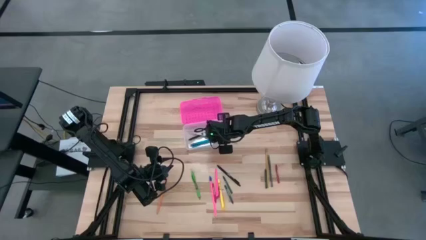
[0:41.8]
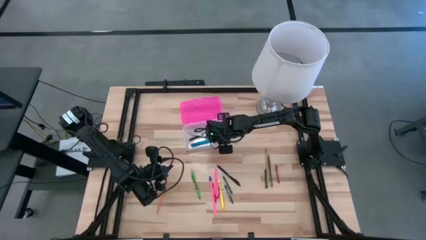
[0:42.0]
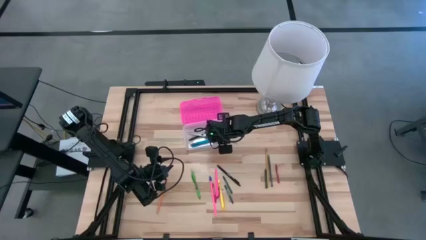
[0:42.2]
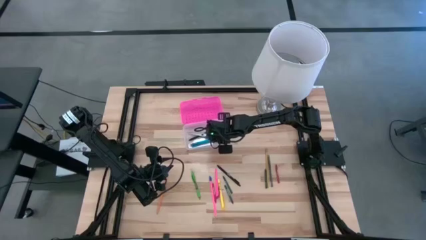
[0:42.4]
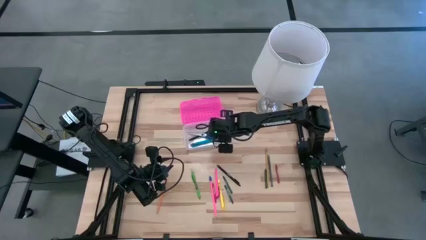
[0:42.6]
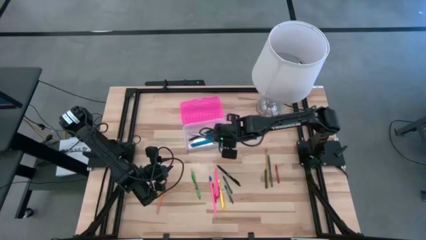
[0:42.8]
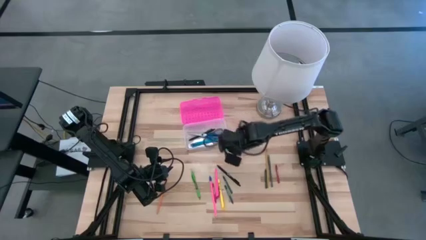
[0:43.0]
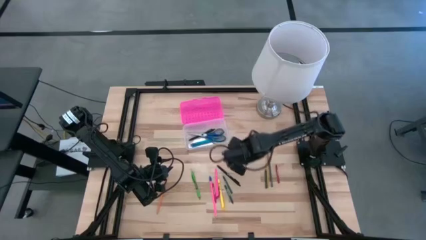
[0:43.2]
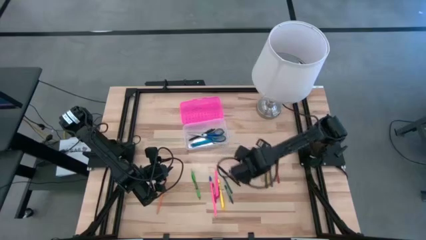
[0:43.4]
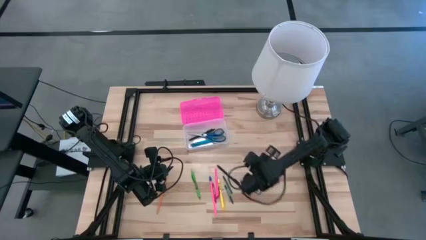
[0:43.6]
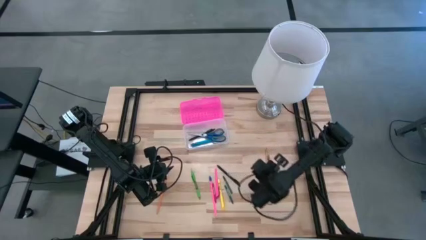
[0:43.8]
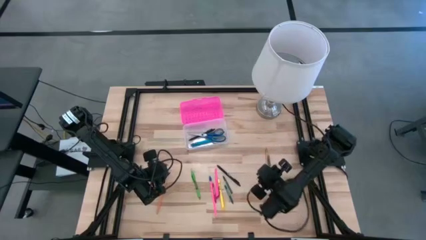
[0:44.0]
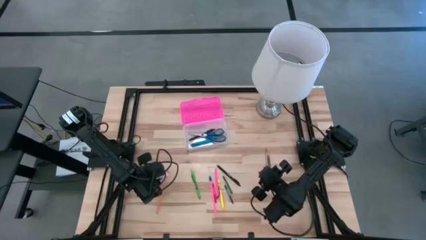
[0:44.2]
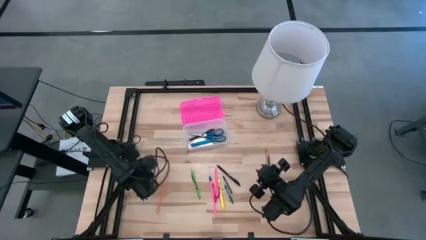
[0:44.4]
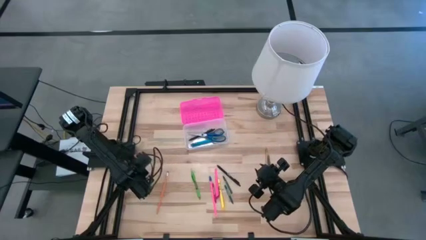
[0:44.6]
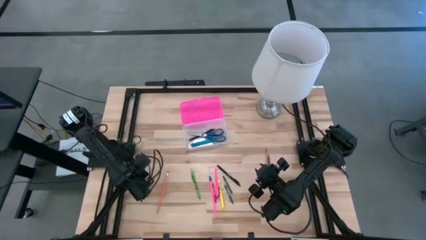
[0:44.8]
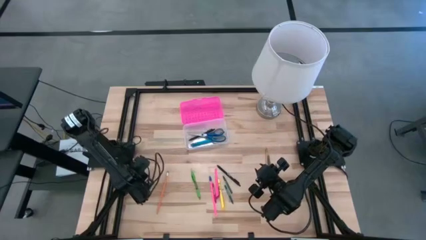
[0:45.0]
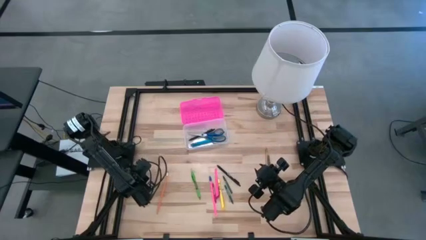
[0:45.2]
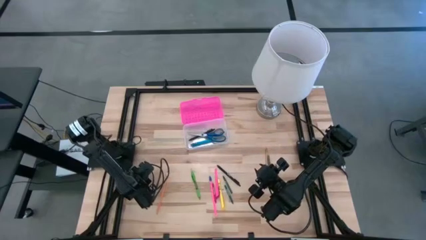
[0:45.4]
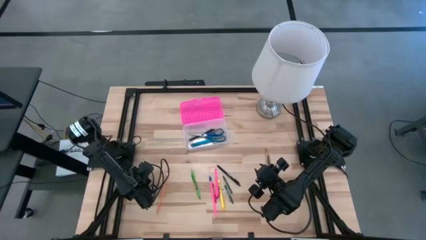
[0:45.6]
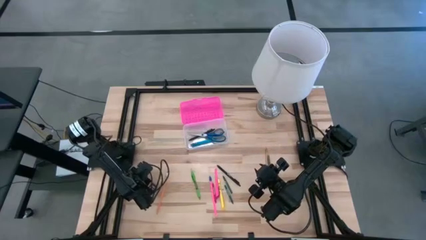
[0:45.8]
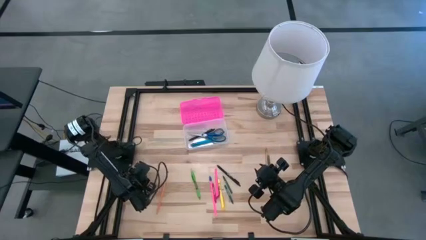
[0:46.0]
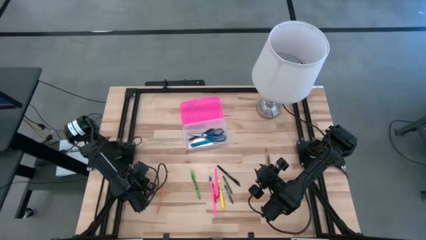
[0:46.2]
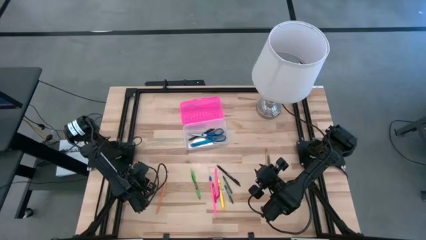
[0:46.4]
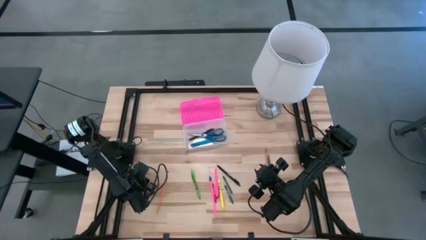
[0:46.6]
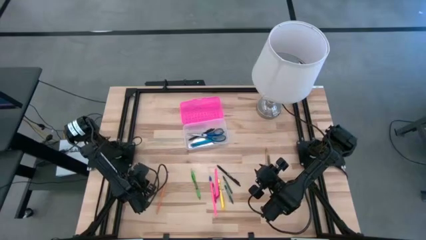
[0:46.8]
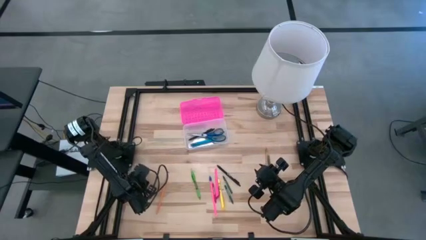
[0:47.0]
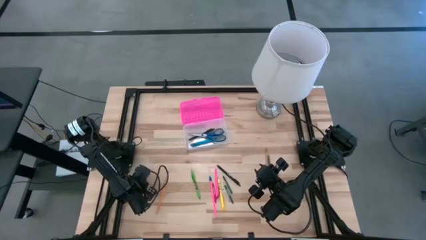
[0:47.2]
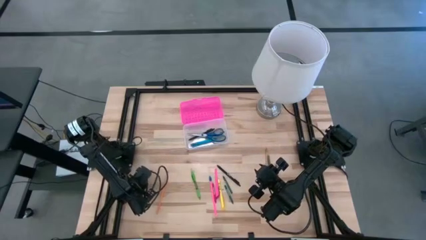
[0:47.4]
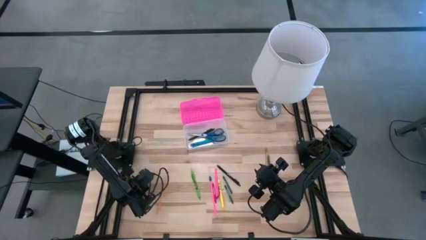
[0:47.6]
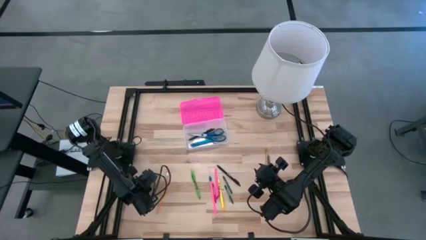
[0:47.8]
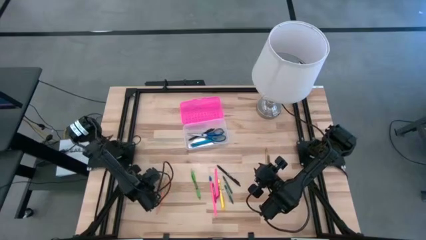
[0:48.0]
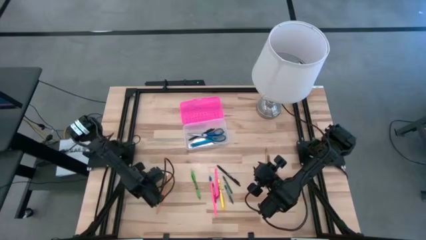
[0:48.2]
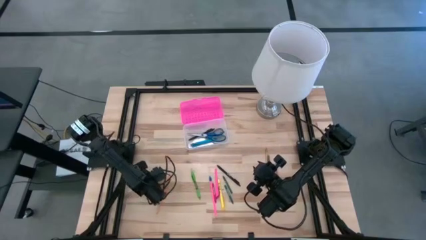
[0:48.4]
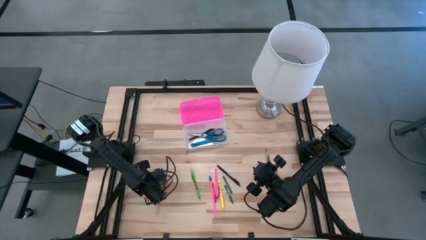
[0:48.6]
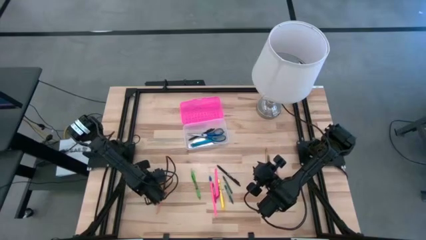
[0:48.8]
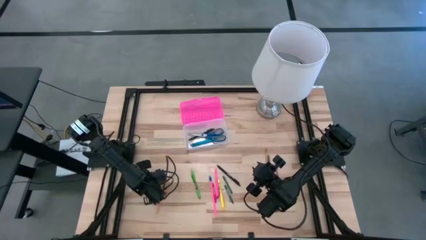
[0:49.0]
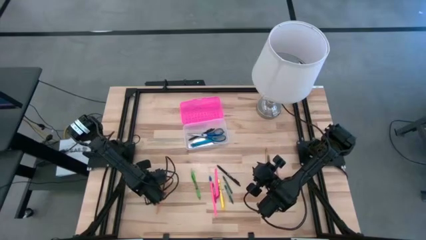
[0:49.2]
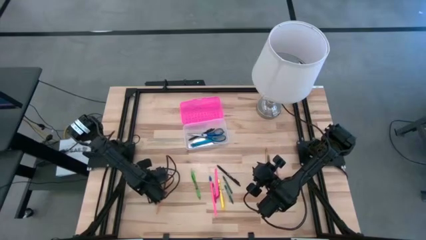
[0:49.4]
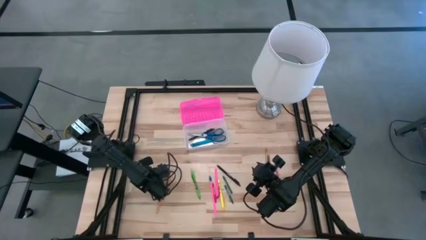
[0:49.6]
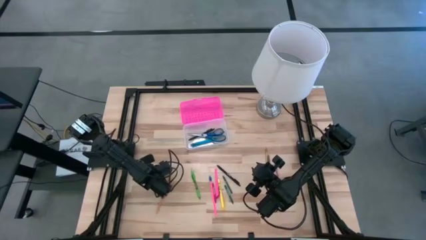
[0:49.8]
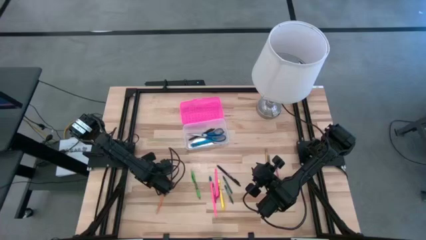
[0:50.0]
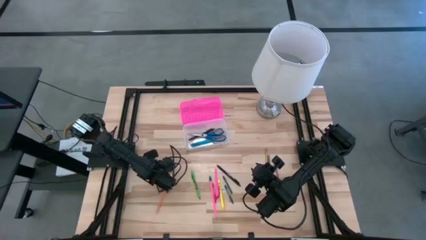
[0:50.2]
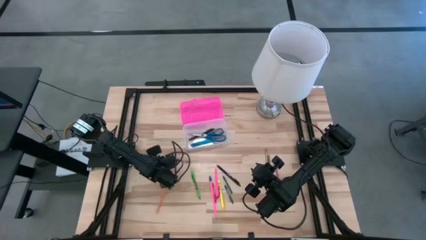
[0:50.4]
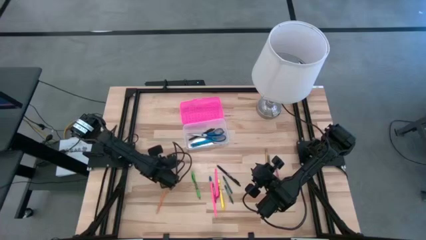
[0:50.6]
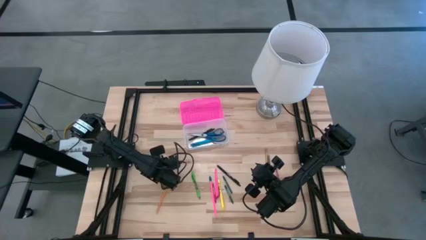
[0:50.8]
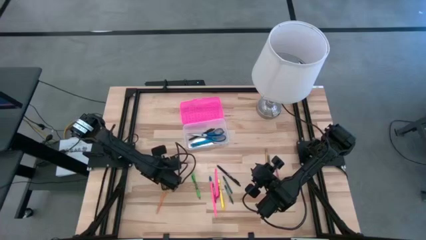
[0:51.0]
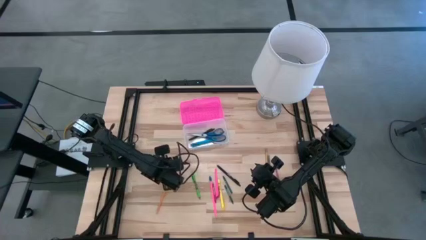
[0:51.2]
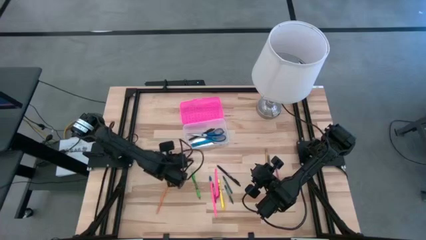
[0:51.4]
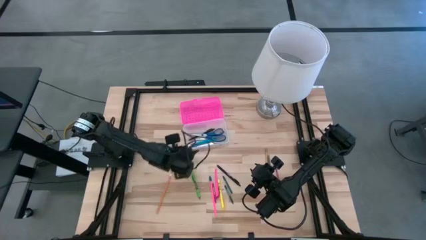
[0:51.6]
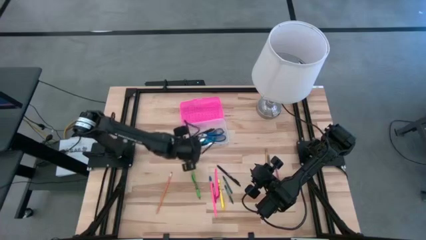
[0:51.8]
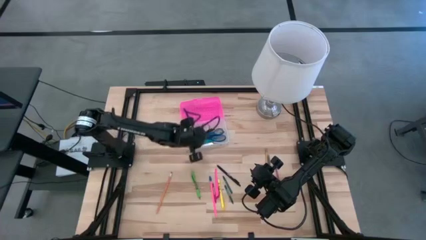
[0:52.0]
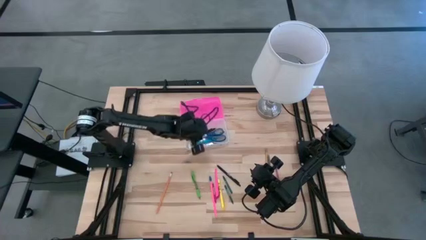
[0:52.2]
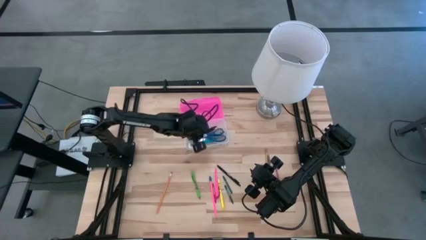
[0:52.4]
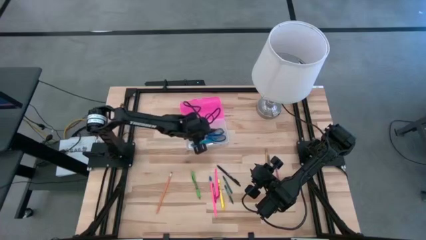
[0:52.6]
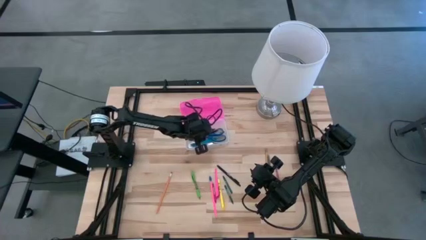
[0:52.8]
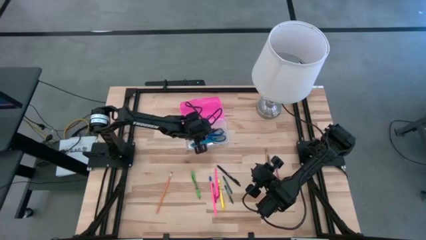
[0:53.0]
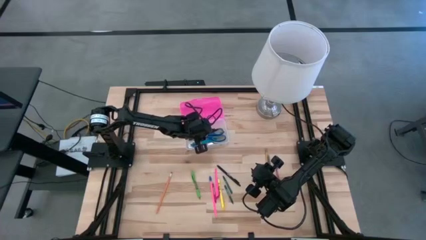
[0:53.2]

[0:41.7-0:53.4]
Task: Pick & place school supplies into a supply box
Put the black pen into the pink supply box

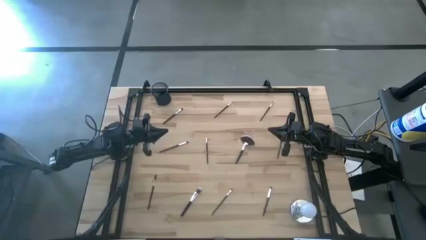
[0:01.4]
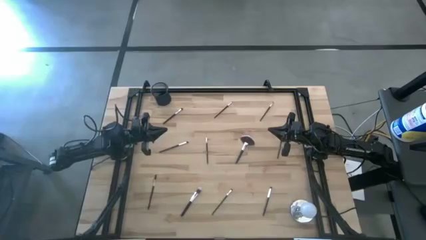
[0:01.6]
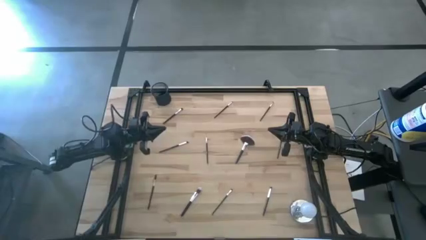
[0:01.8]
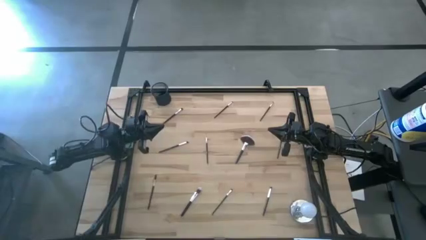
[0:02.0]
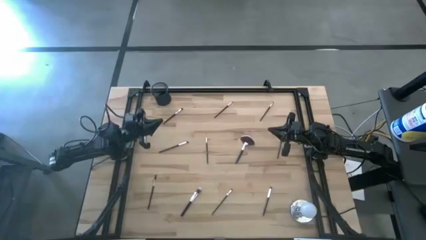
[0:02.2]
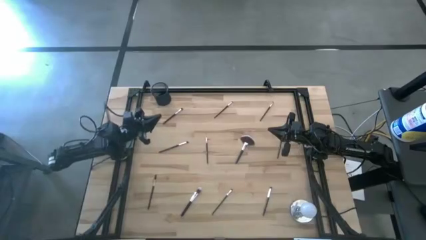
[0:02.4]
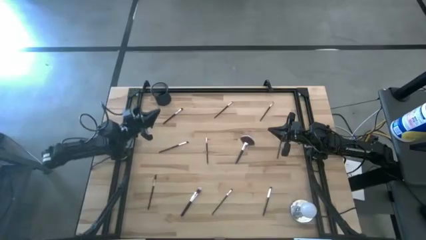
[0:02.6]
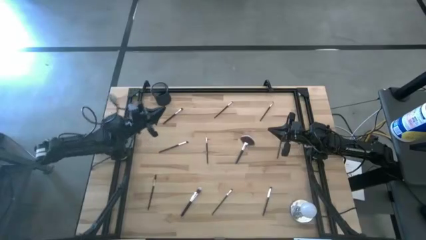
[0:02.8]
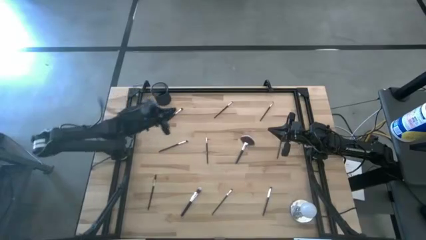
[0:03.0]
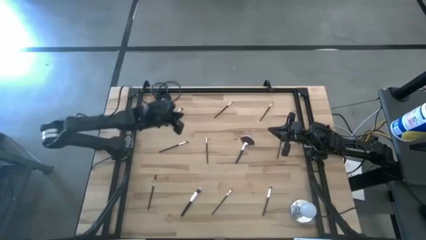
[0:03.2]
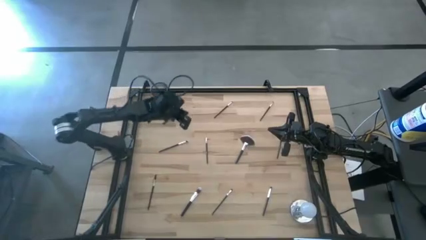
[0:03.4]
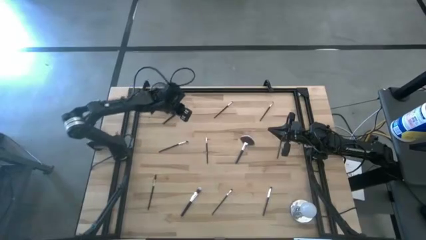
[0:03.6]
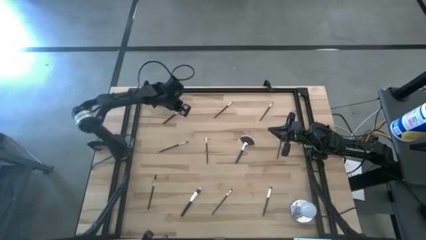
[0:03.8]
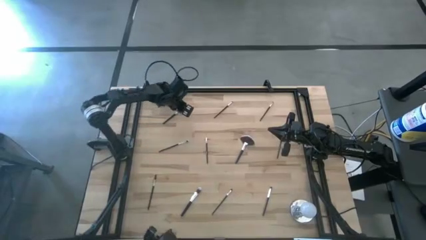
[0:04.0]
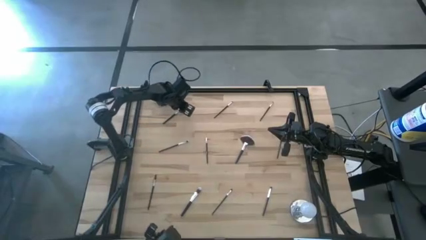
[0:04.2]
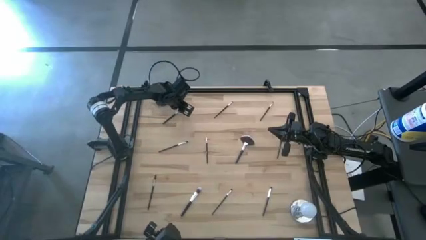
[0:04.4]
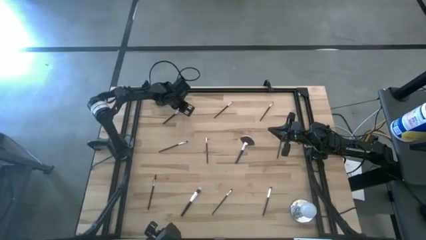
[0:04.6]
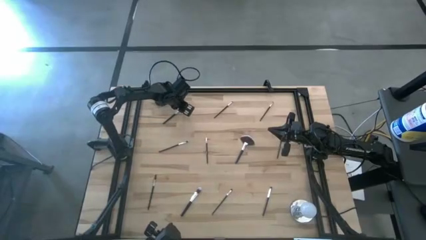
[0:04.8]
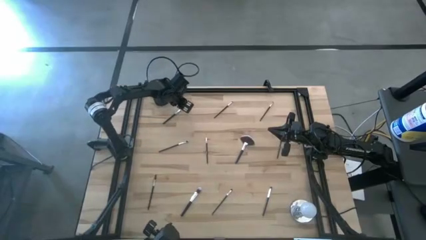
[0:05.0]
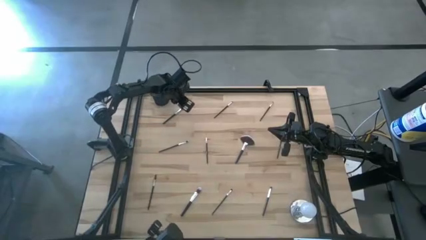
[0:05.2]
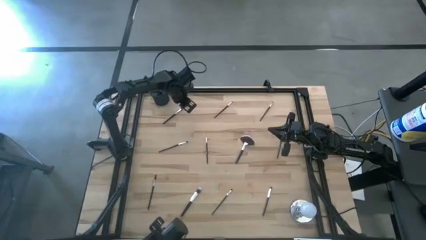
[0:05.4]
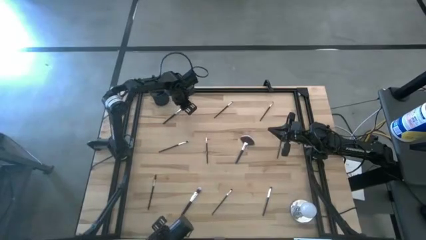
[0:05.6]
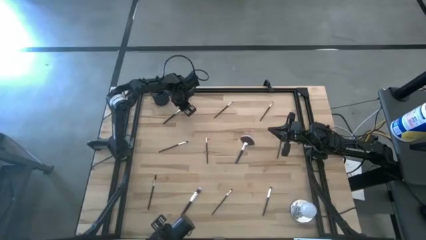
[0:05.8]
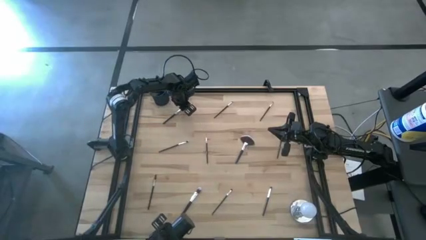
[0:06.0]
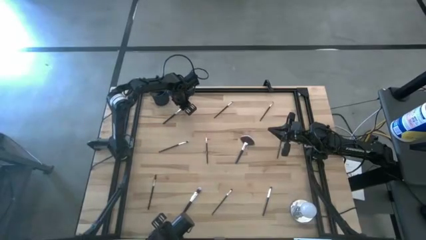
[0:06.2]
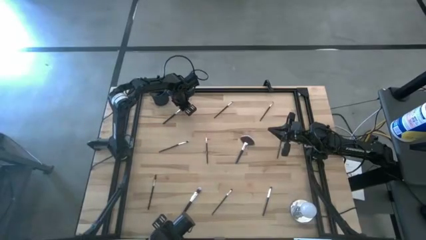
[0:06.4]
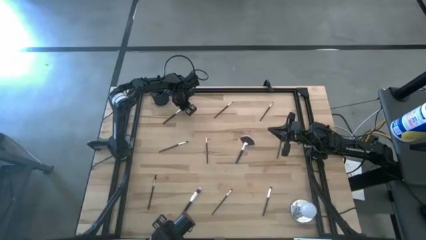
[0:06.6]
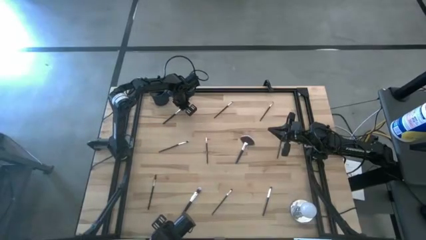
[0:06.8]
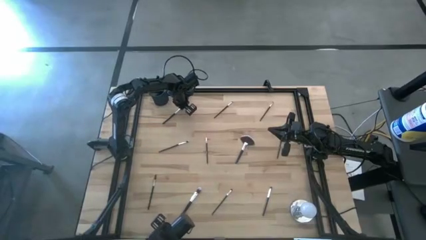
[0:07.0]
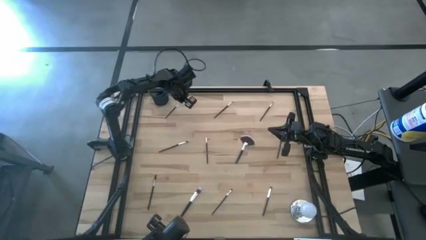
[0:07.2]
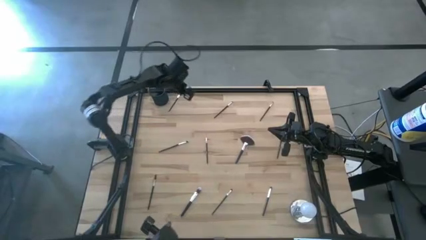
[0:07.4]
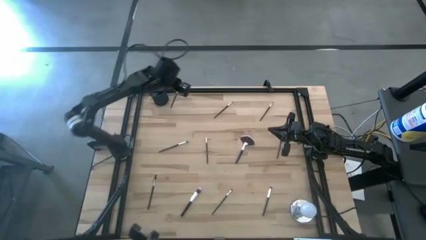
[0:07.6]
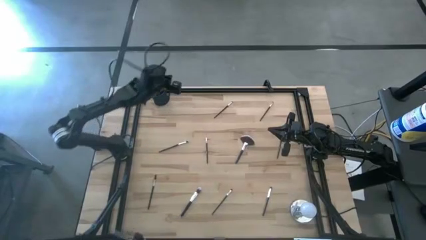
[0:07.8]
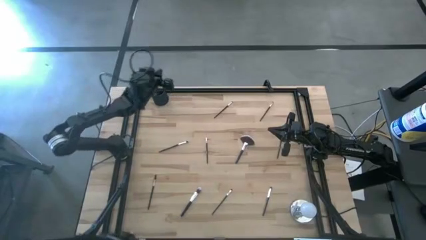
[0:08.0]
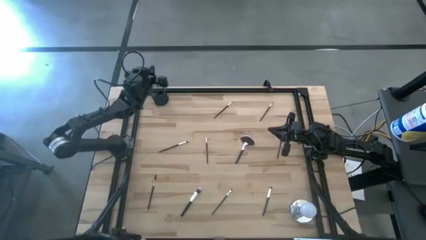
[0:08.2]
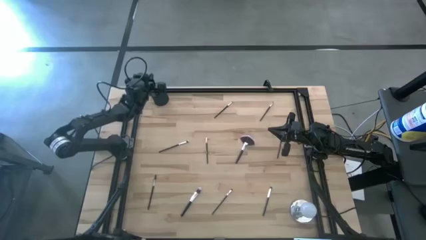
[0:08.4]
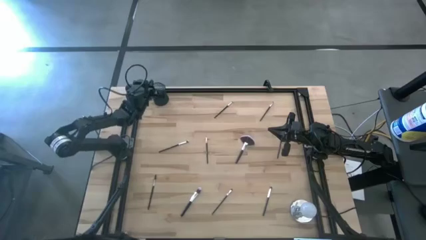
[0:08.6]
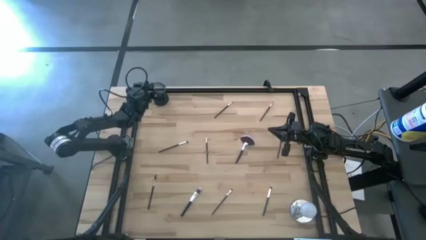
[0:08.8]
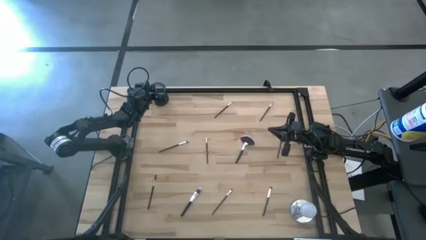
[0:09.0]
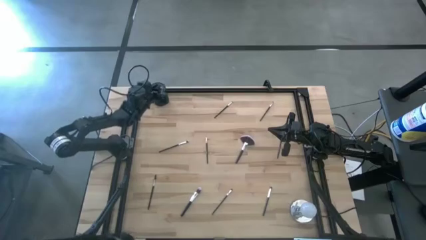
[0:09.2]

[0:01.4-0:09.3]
Task: Put items in baskets/containers
Put the eyeshadow brush into the holder
